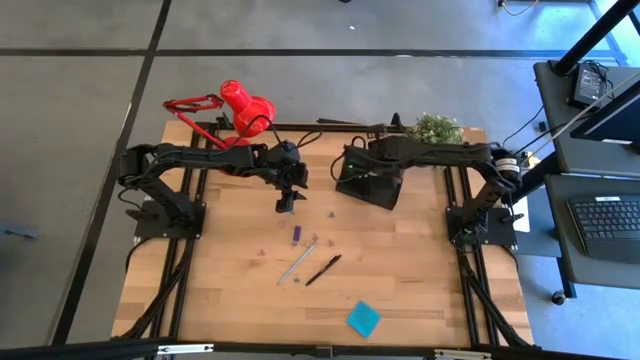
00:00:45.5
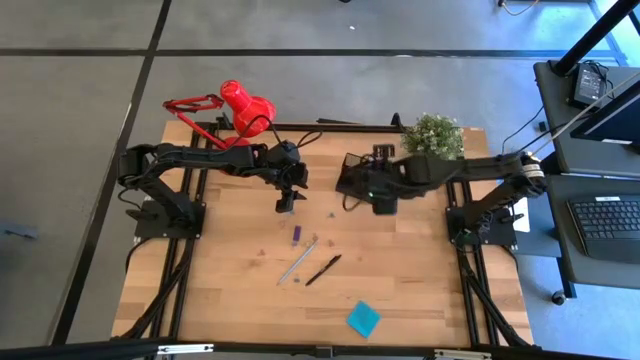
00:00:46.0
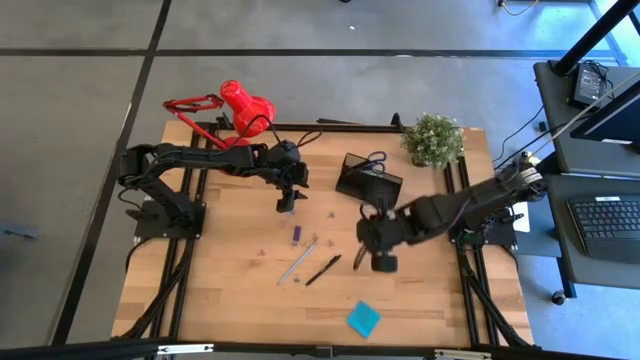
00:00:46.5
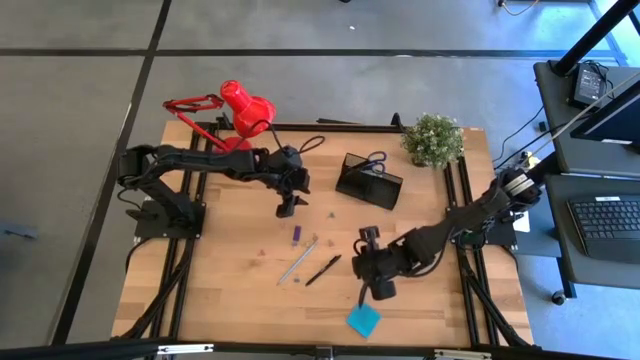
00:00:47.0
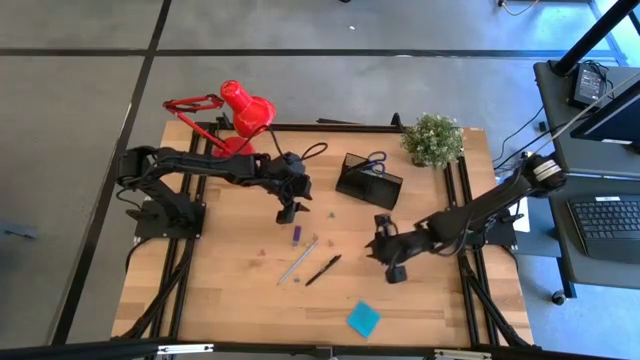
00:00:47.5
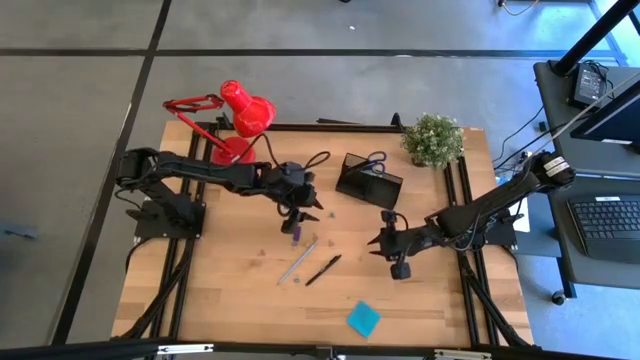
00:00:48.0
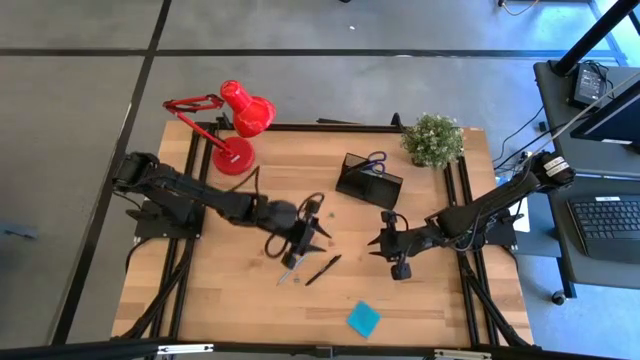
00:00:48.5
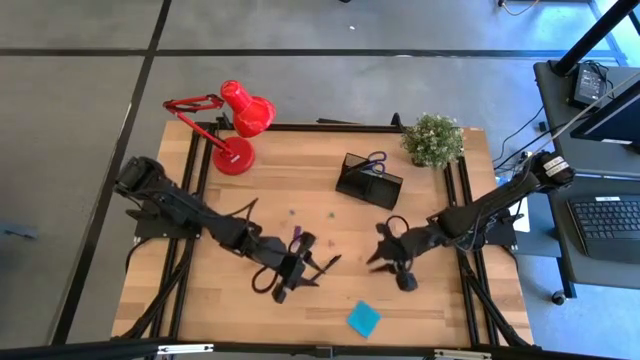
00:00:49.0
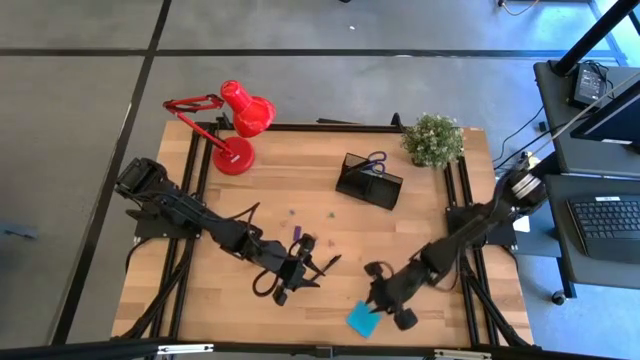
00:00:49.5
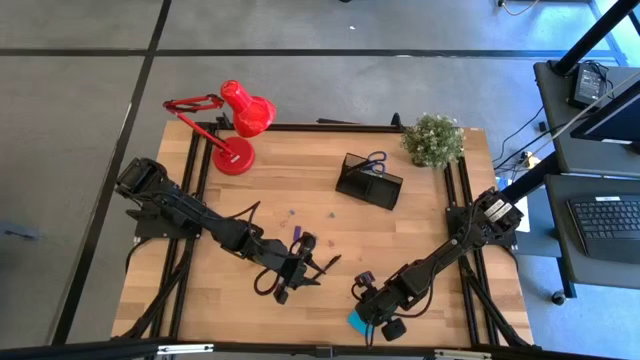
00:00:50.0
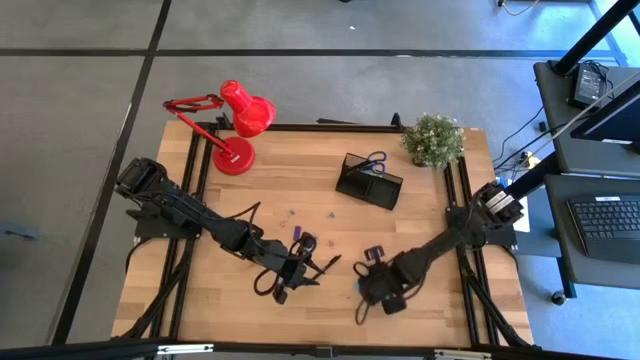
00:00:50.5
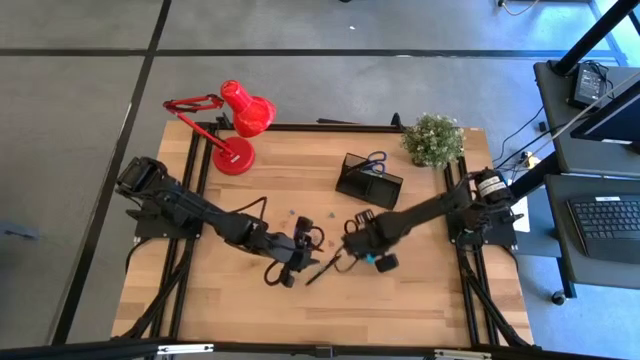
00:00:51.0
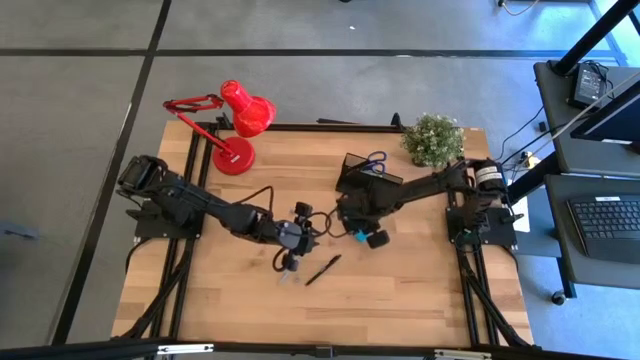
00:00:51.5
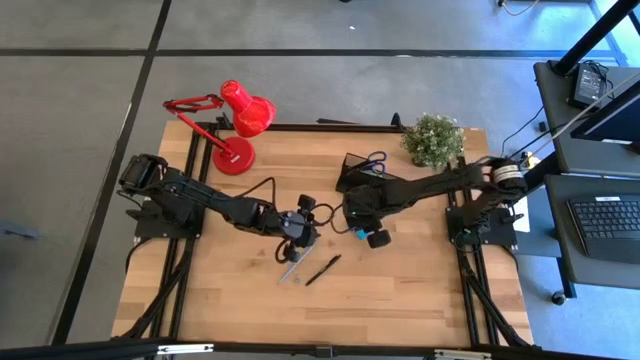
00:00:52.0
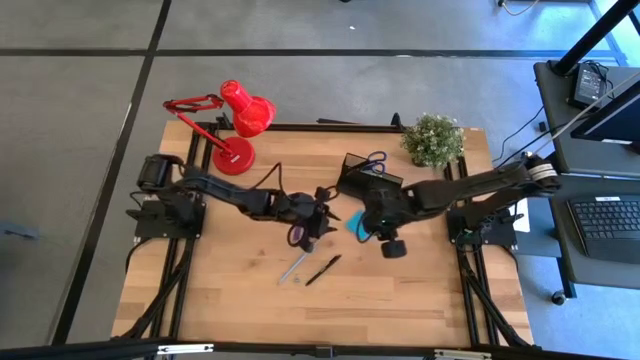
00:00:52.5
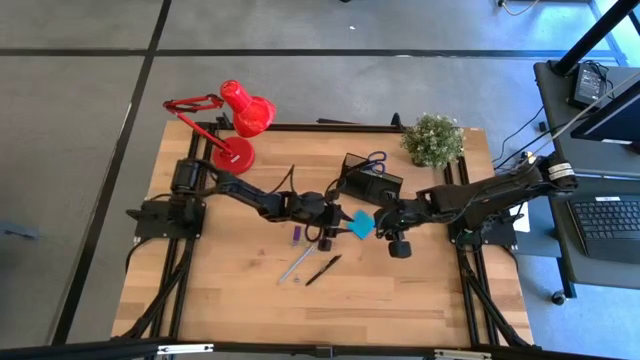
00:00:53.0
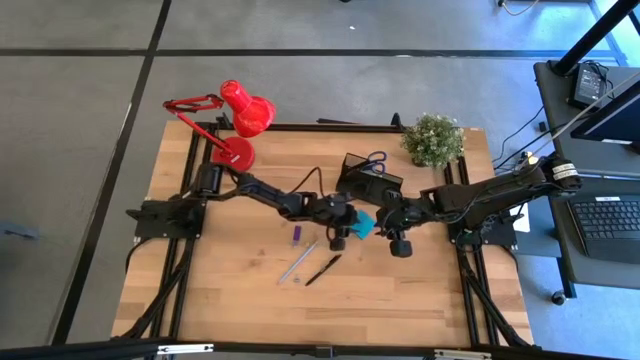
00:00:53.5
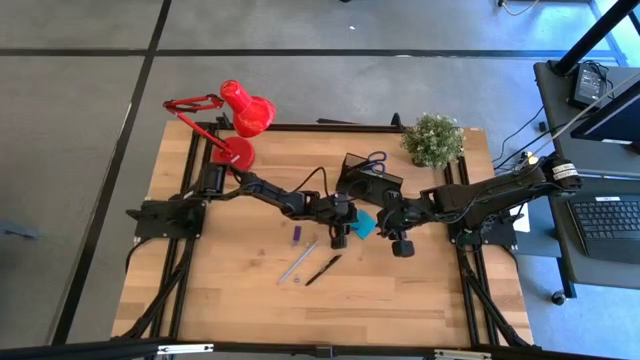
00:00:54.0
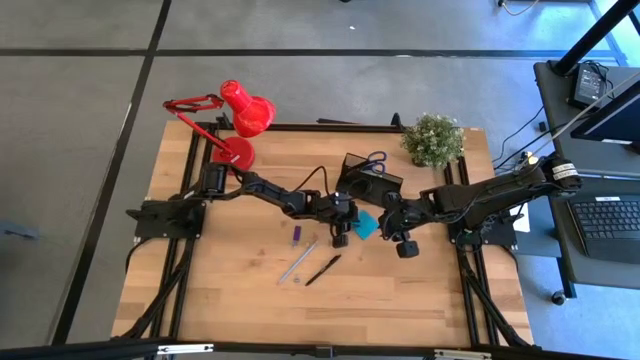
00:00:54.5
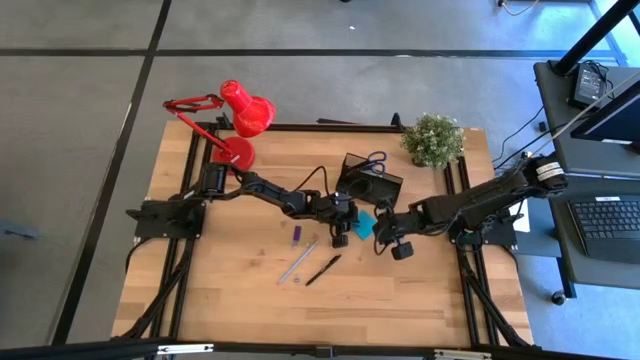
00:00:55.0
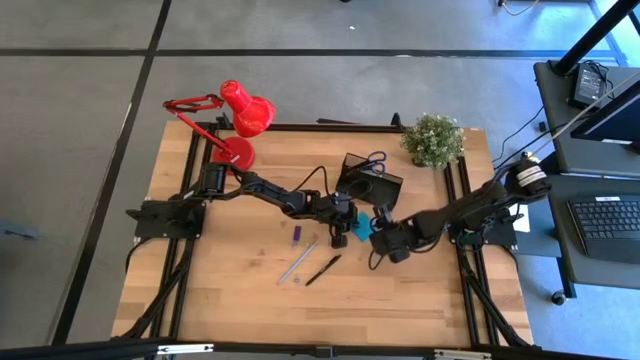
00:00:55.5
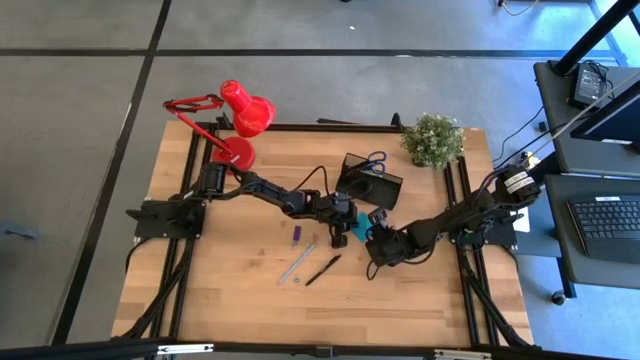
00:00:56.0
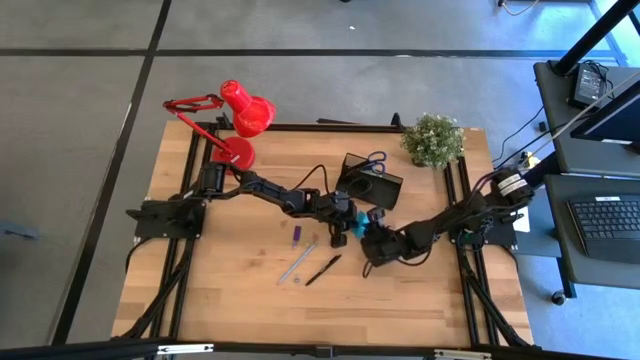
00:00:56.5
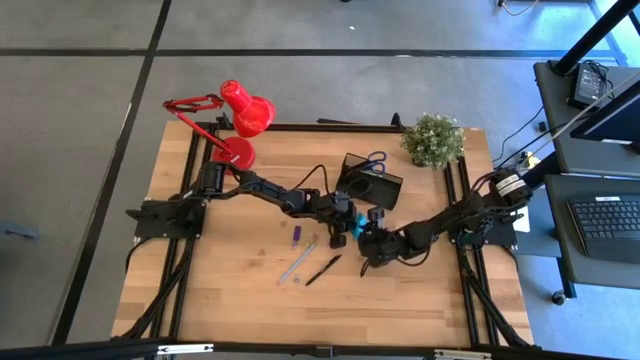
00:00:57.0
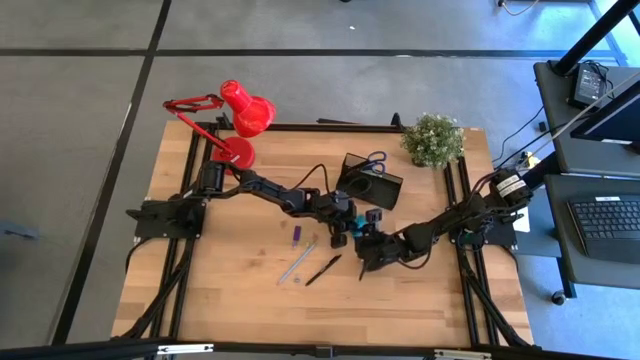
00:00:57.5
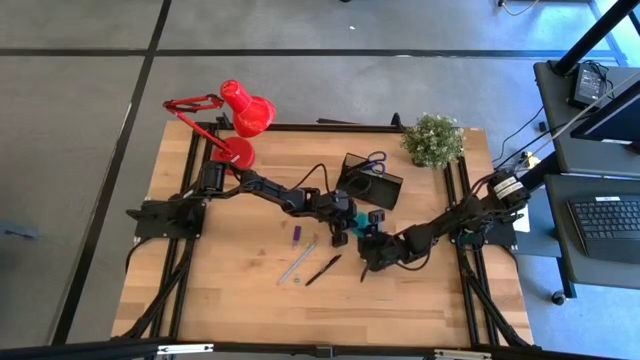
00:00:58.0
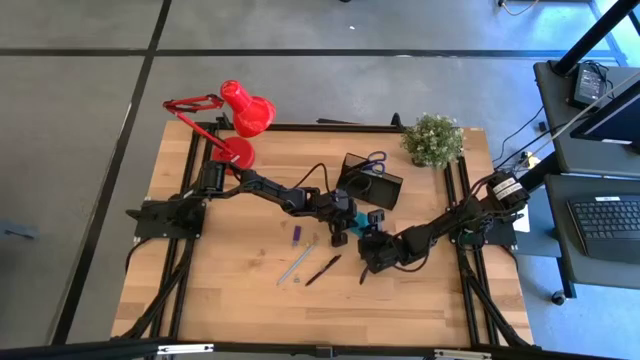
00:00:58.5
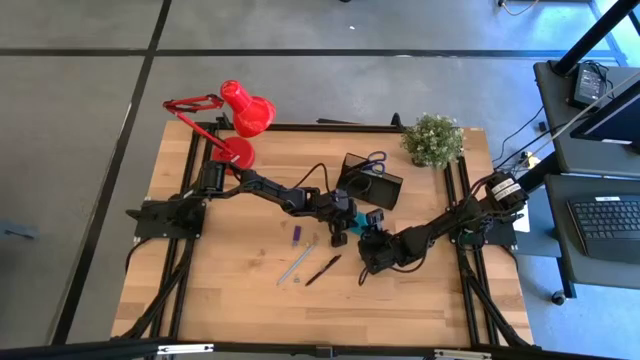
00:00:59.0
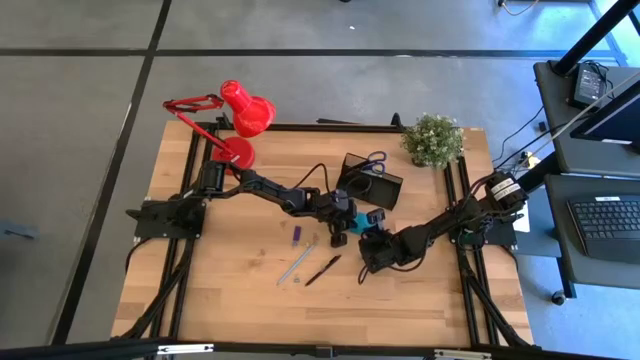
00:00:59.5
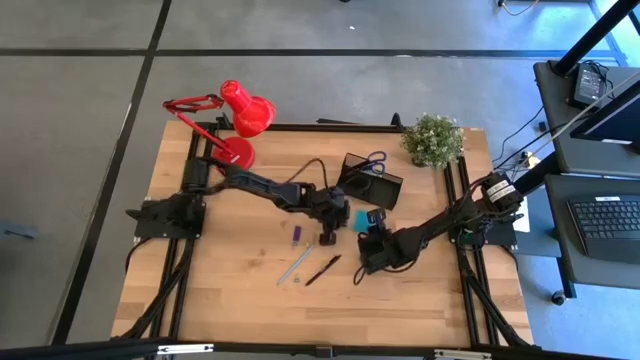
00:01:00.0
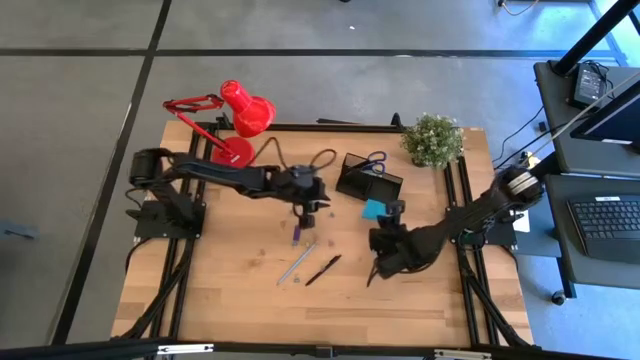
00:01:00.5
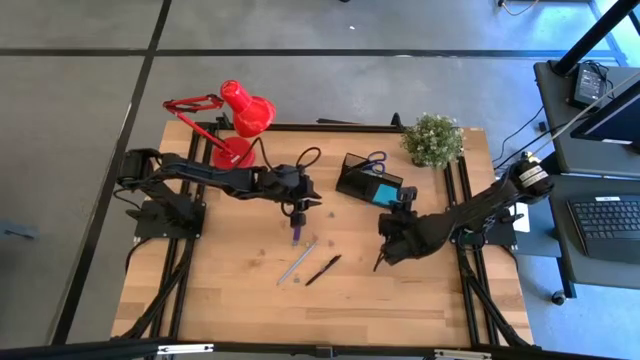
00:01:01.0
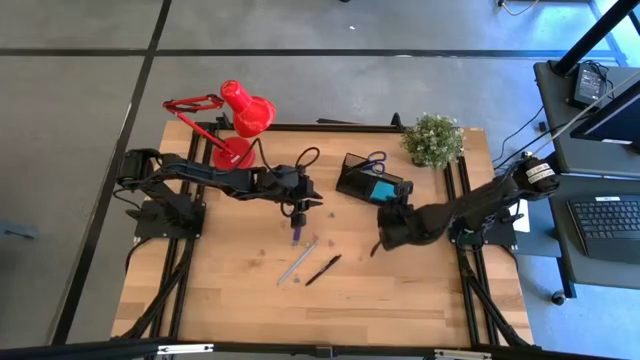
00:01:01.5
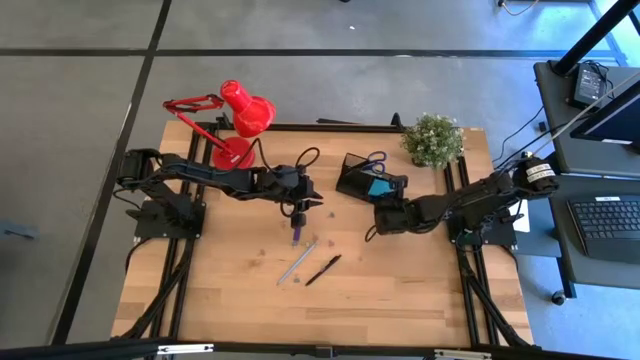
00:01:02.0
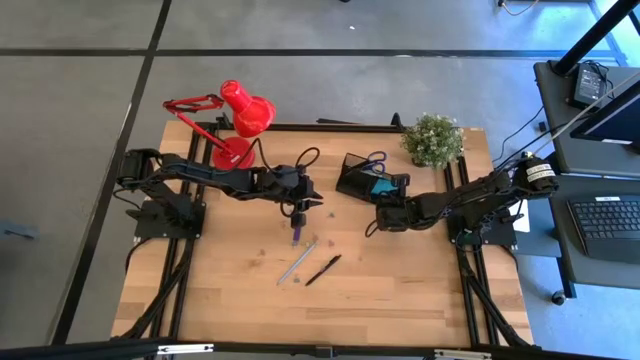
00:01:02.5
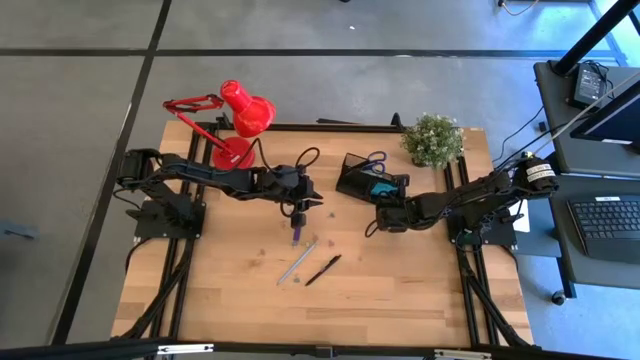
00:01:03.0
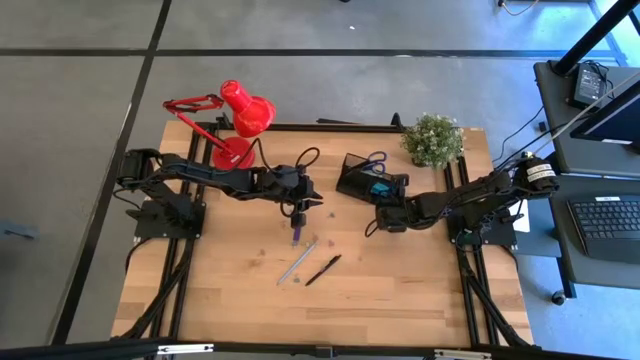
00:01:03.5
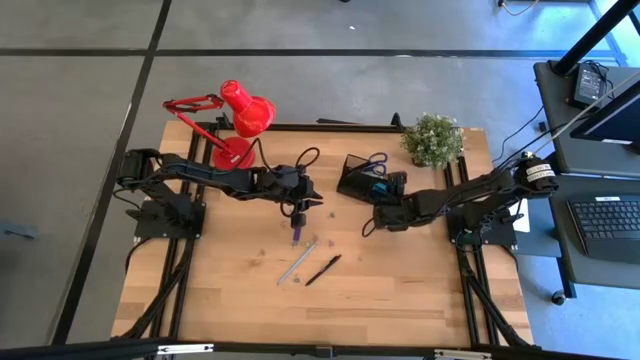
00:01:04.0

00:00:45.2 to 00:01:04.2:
Task: Pick and place office supplies into organizer
Put the blue sticky note into the black desk organizer

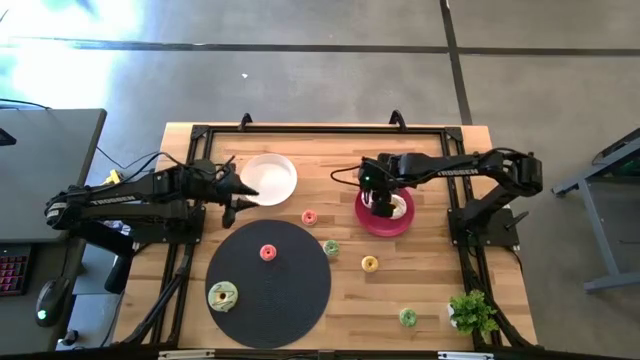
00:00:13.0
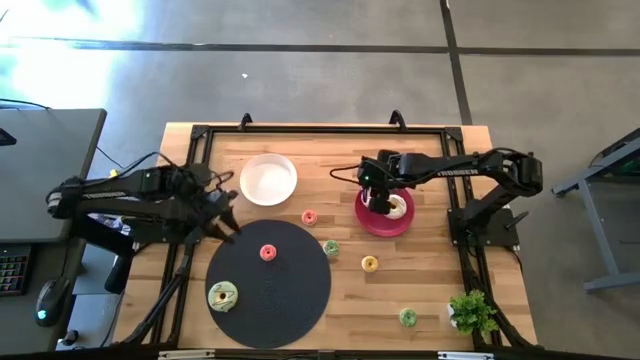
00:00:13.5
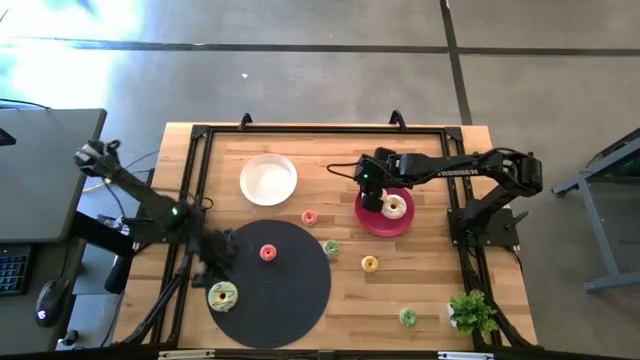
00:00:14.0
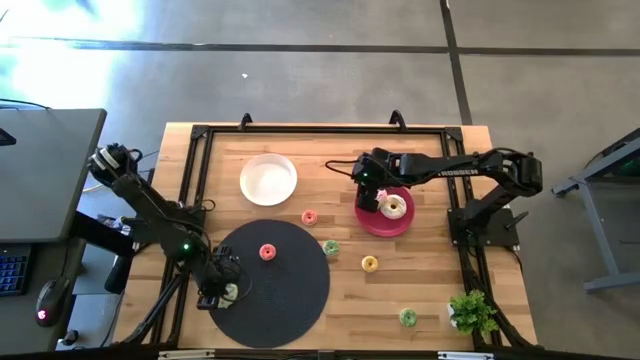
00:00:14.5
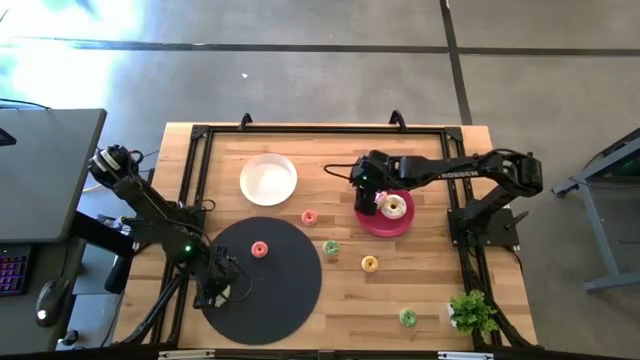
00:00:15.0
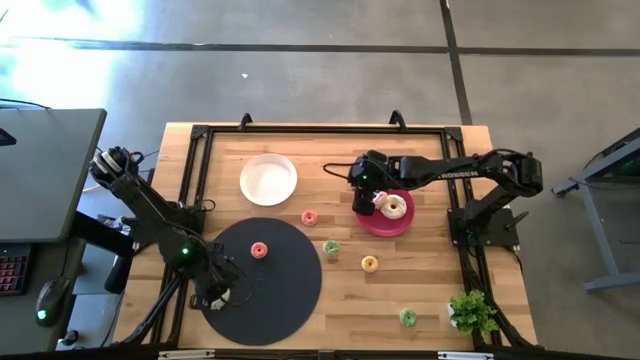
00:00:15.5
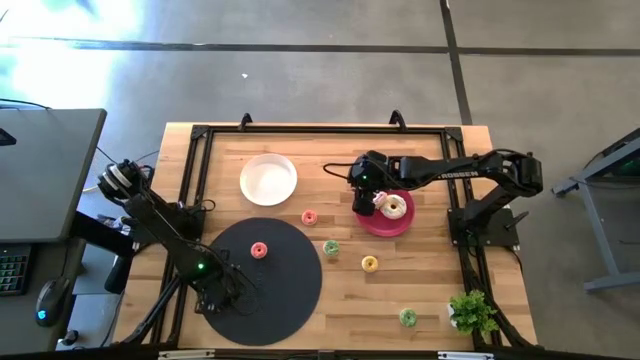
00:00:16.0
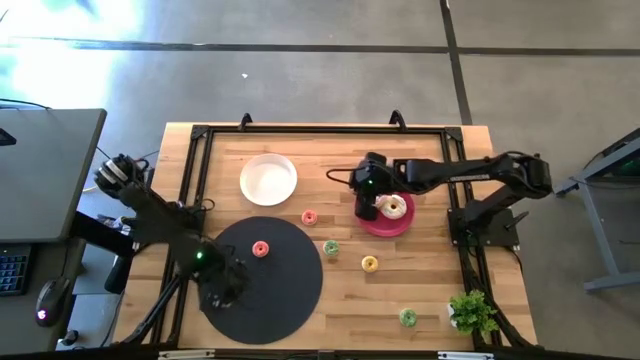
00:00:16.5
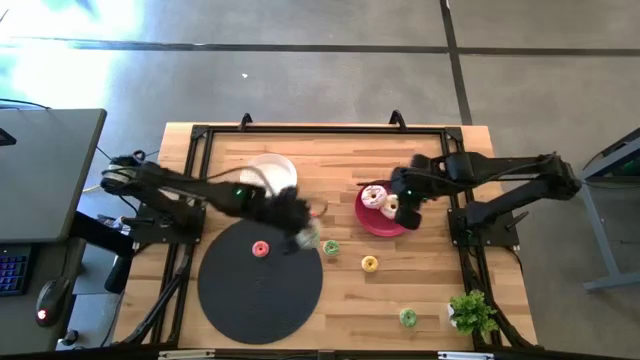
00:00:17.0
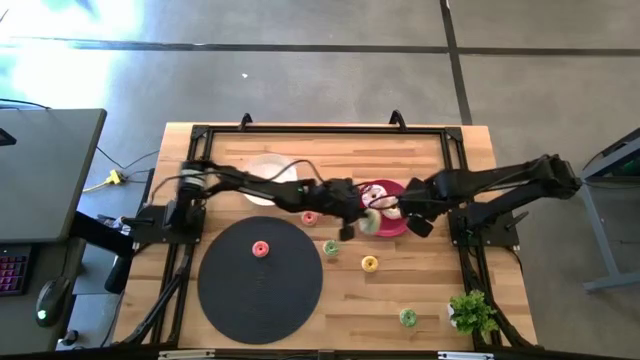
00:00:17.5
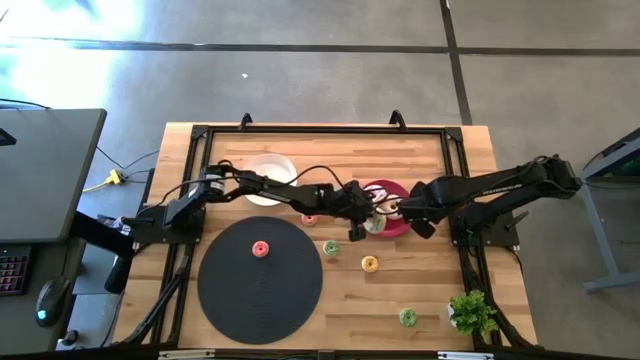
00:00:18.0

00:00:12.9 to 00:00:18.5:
Task: Pick & Place donuts
Put the large green donut on the pink plate
